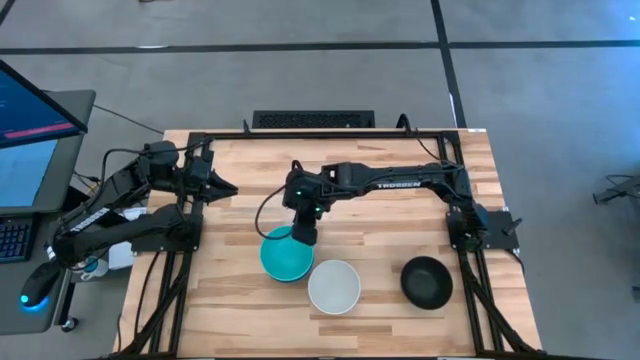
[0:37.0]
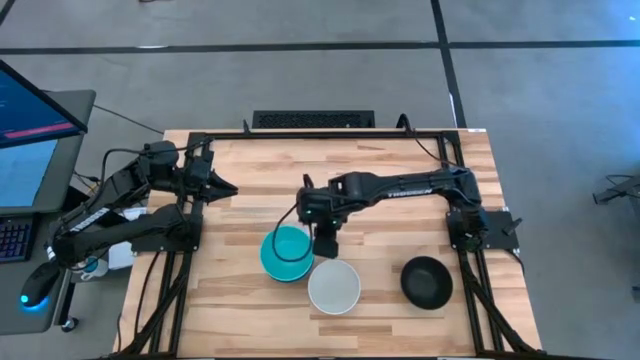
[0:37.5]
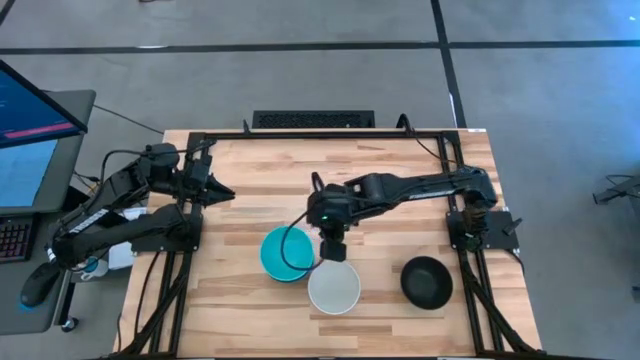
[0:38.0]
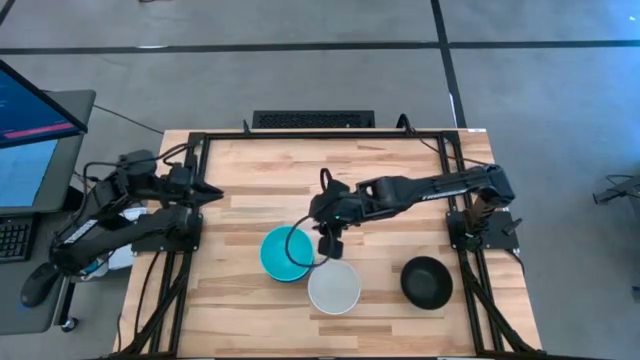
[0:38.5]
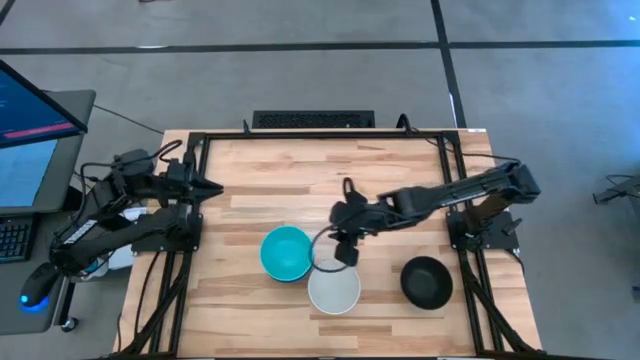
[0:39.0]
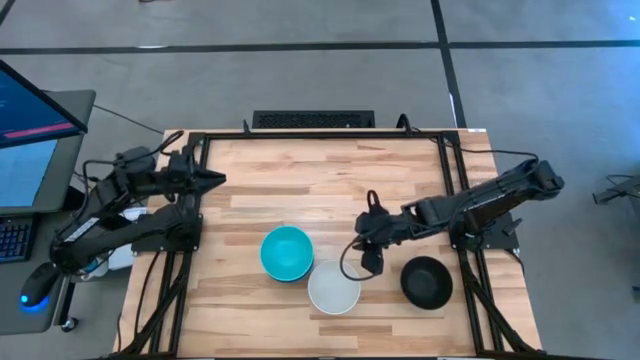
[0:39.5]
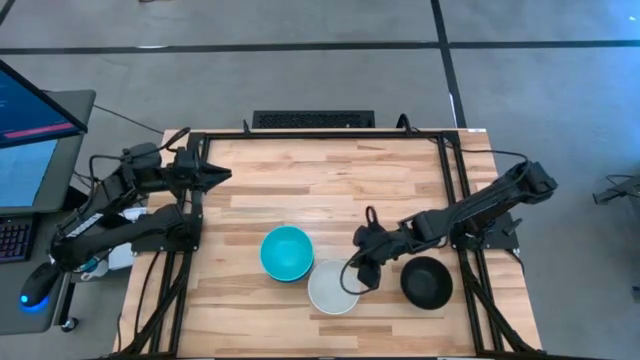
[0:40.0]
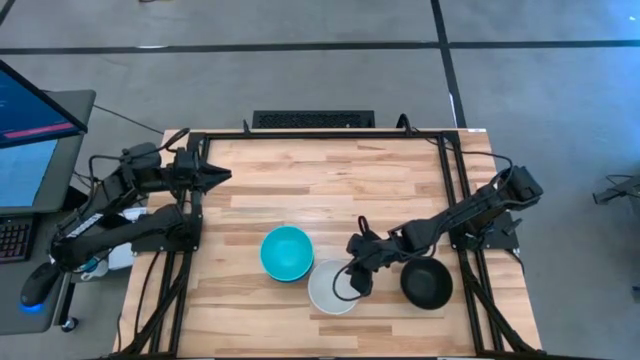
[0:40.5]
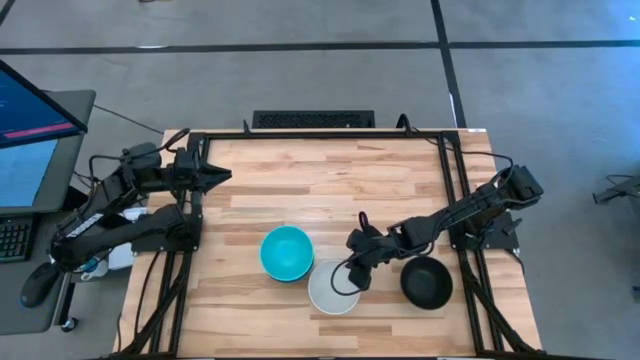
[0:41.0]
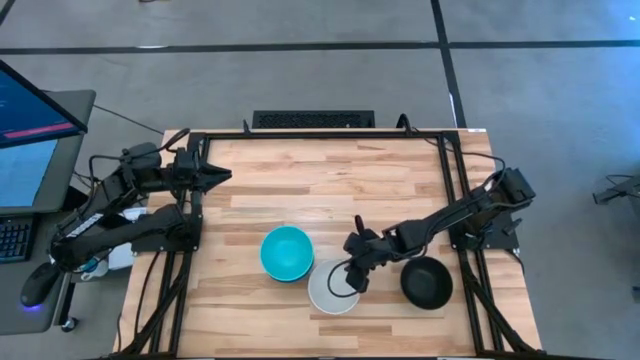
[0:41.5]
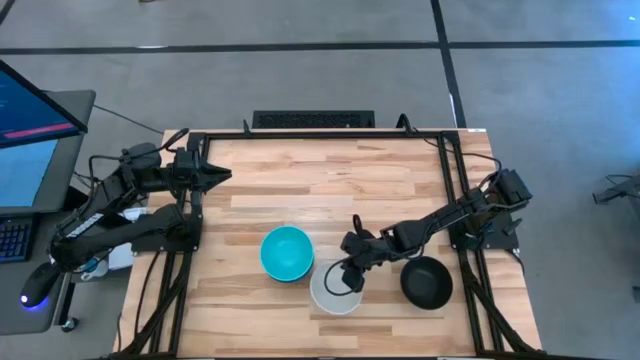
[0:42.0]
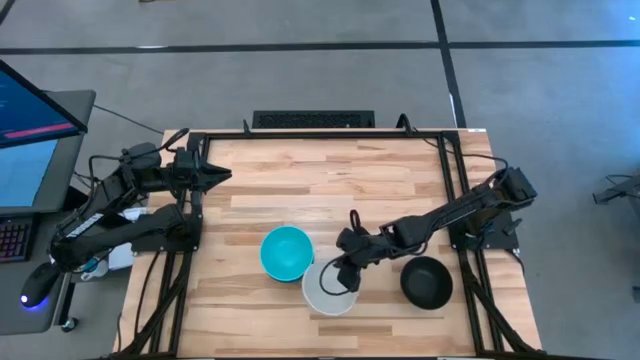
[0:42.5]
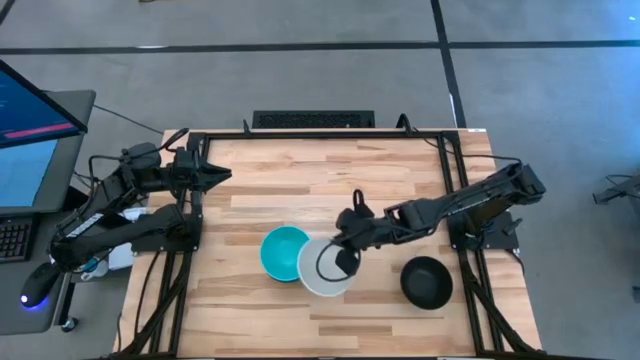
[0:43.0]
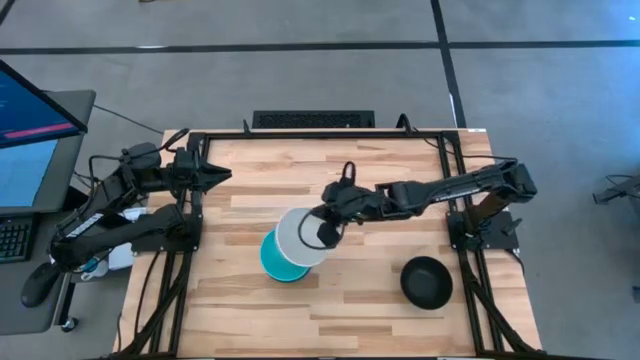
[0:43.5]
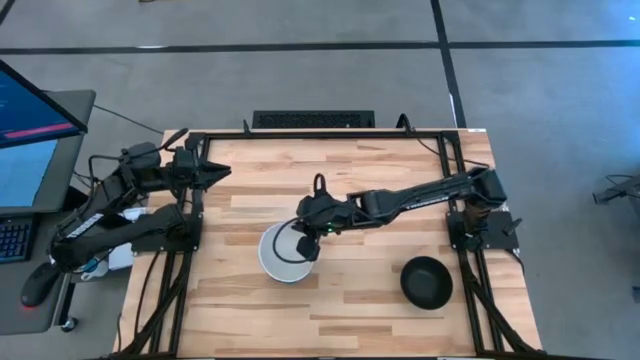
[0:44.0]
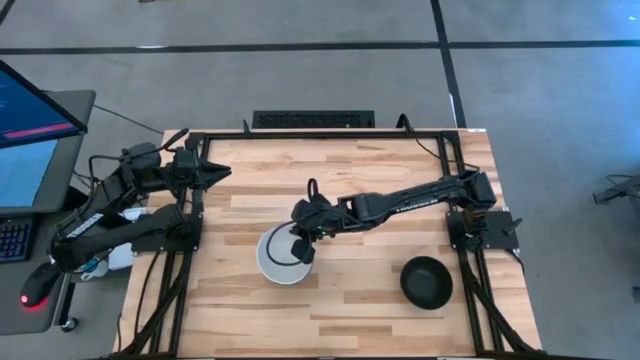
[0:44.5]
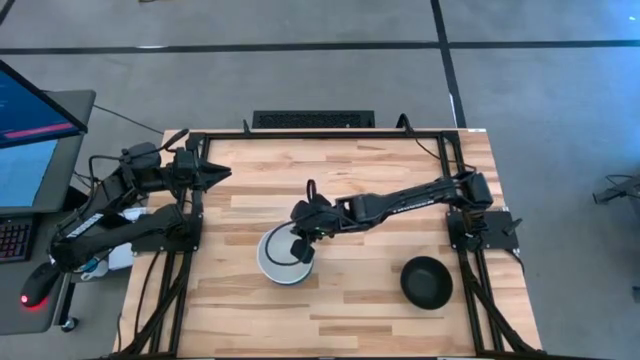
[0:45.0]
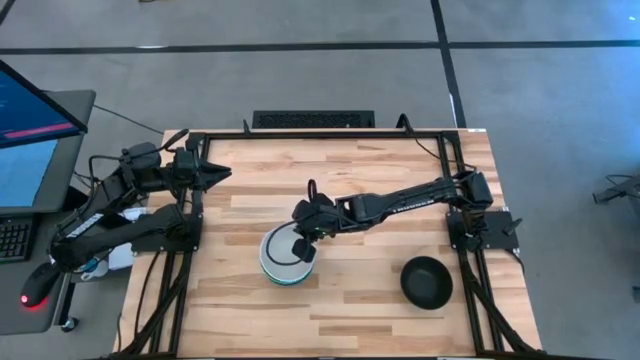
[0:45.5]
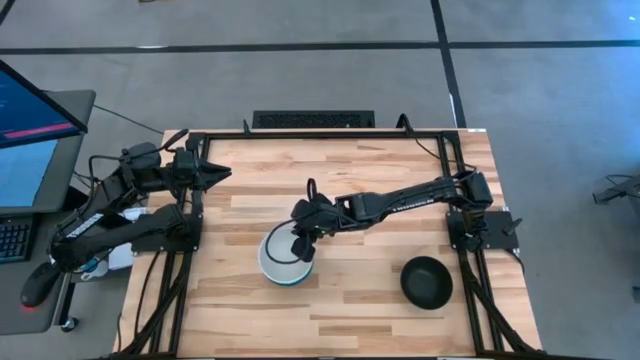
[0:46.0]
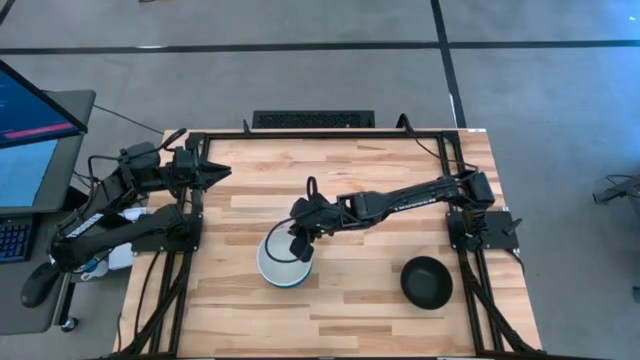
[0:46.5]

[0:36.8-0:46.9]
Task: Nest bowls inside each other
Stack the white bowl on the light blue bowl

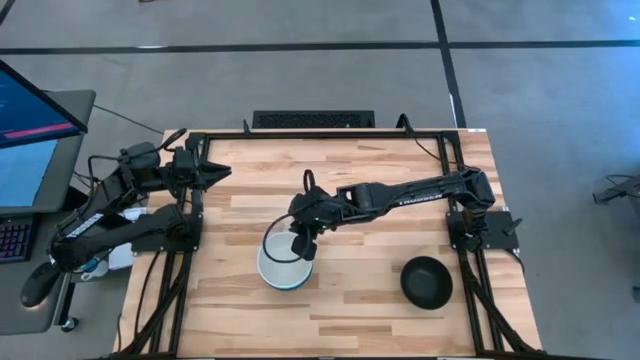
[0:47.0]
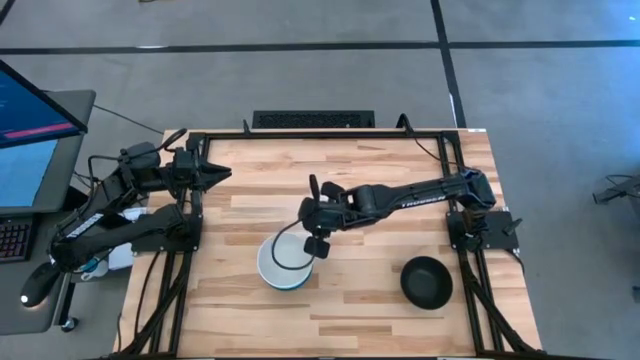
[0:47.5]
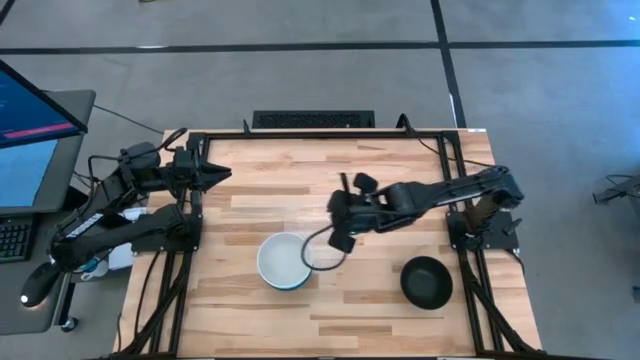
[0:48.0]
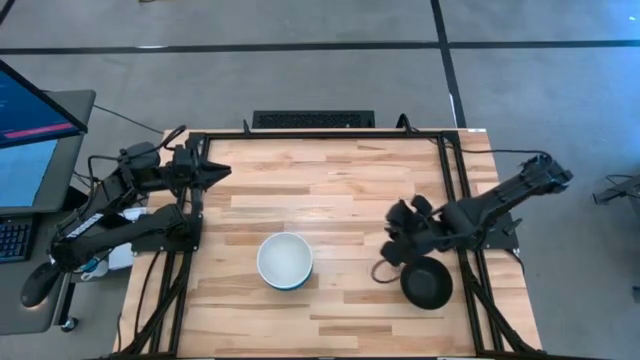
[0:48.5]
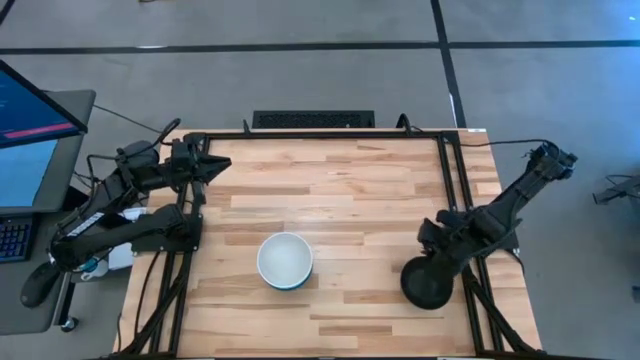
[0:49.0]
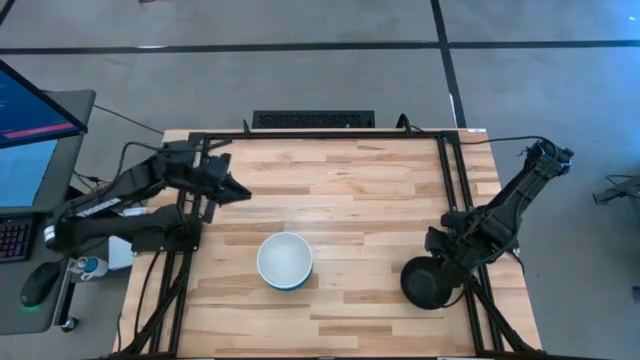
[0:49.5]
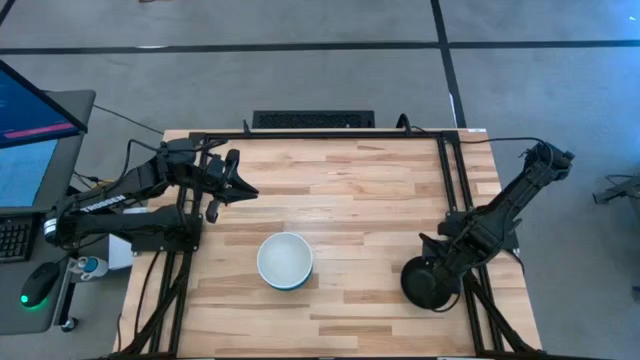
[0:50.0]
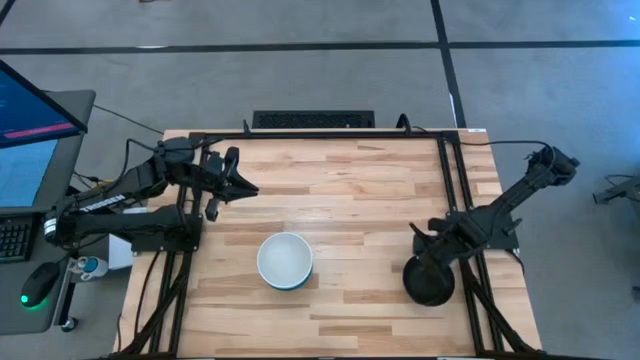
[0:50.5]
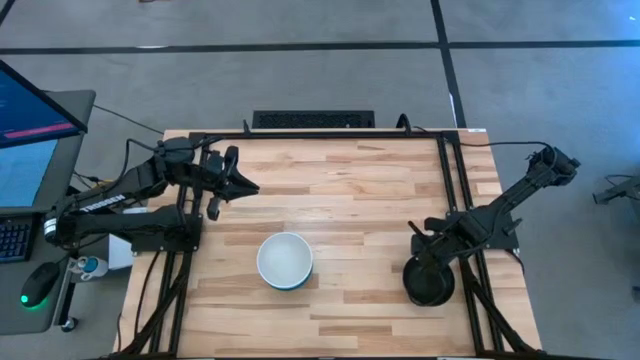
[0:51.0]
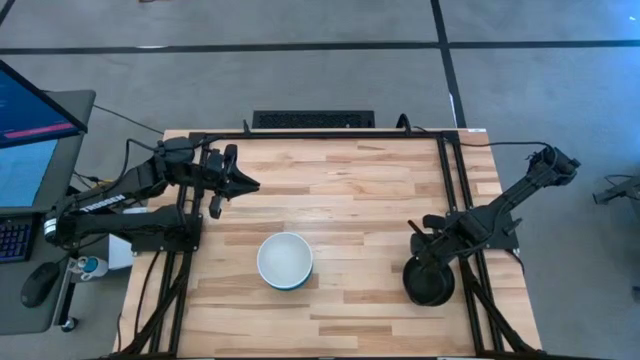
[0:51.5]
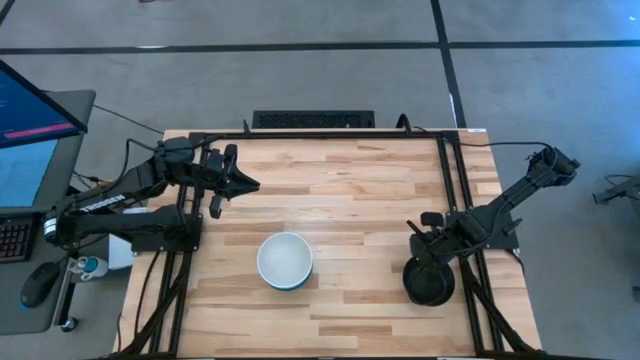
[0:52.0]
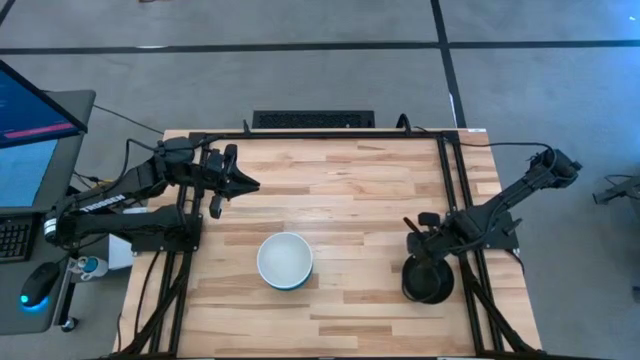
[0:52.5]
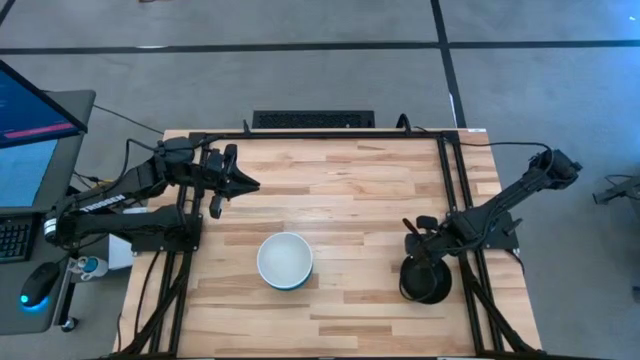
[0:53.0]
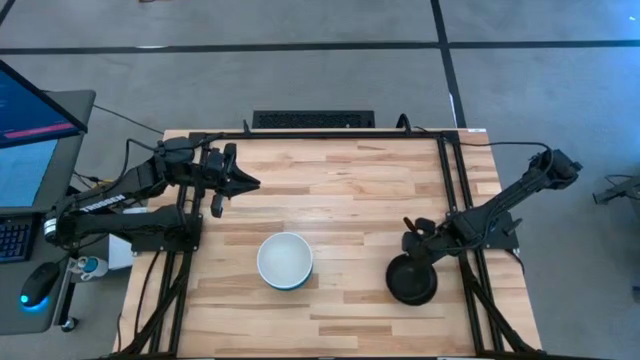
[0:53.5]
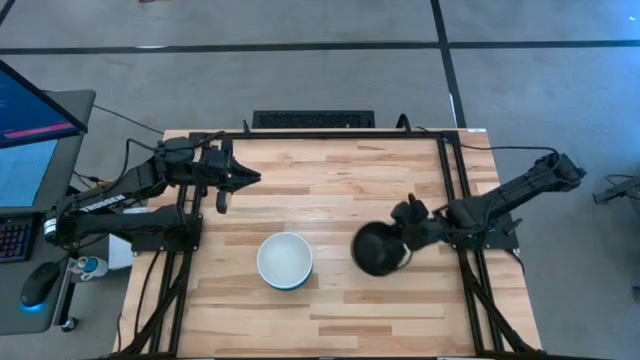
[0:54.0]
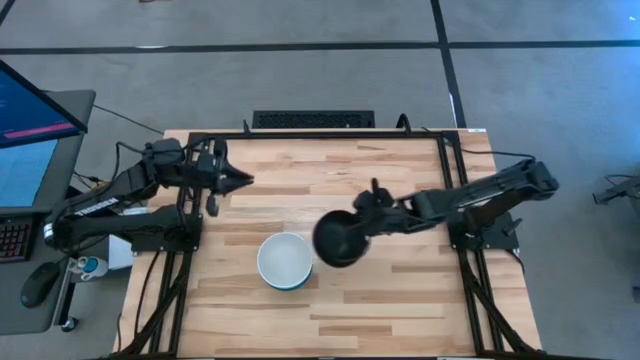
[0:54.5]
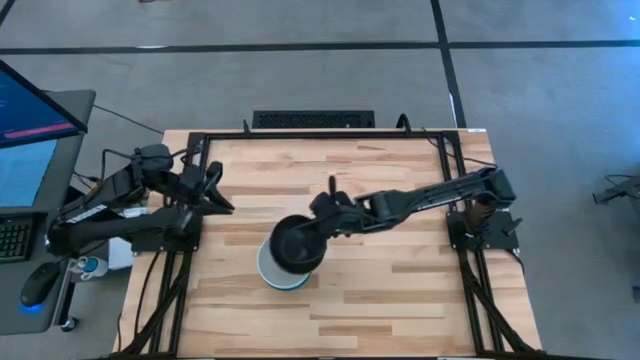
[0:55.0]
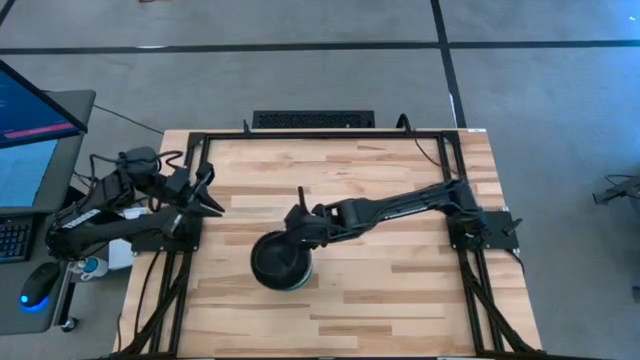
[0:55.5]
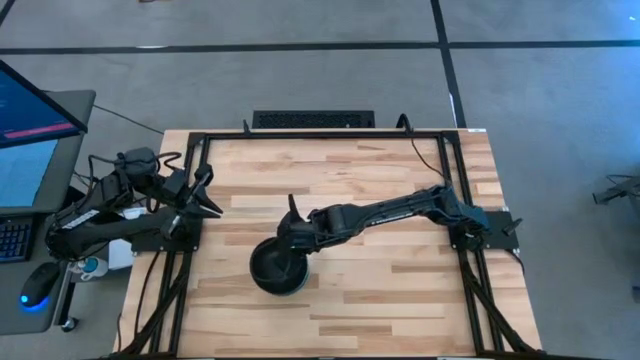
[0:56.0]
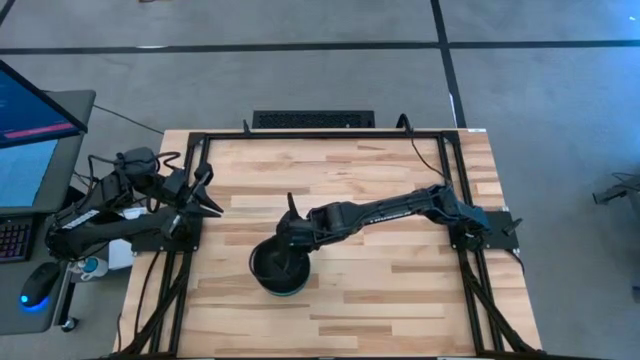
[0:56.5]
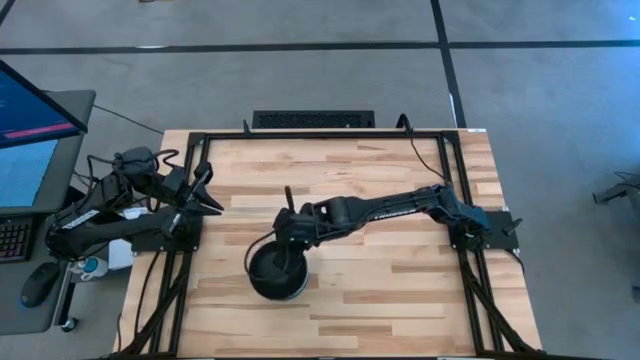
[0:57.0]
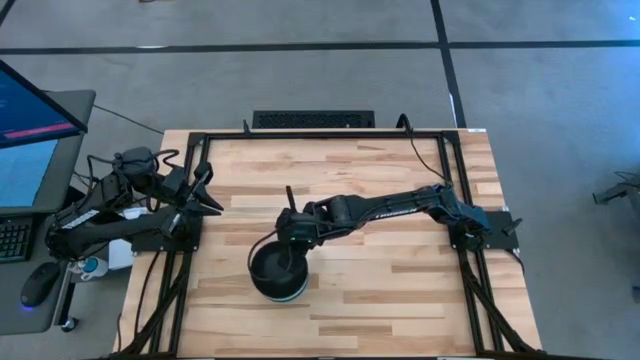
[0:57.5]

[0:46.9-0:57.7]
Stack the black bowl on the white bowl

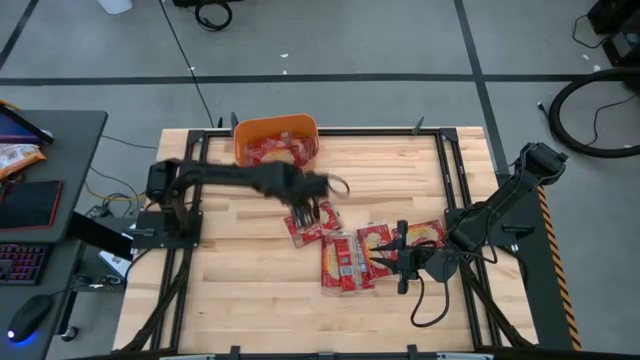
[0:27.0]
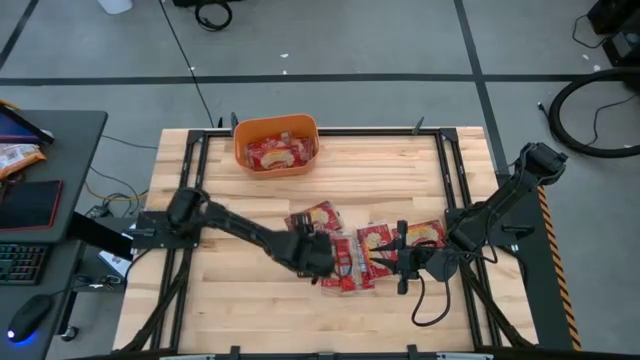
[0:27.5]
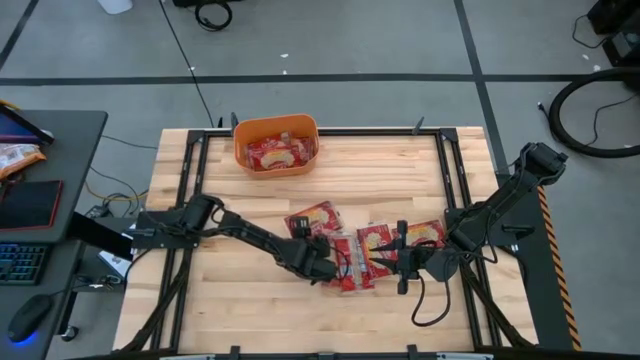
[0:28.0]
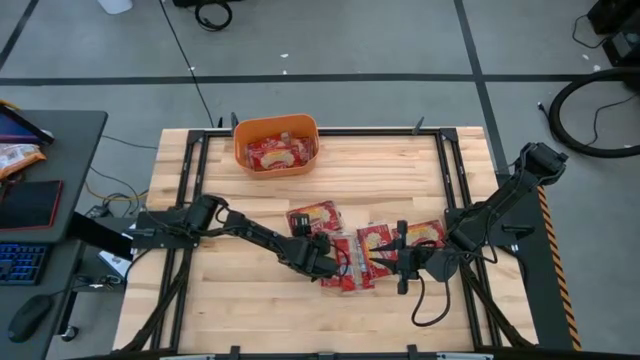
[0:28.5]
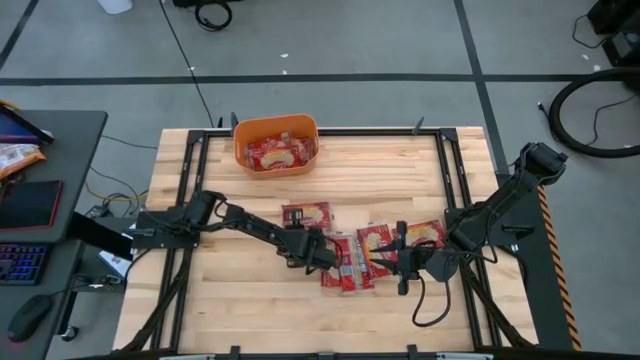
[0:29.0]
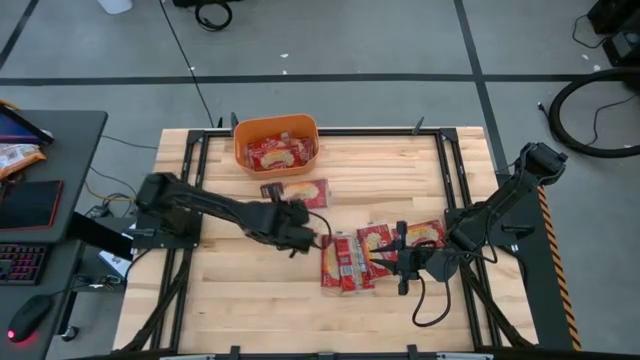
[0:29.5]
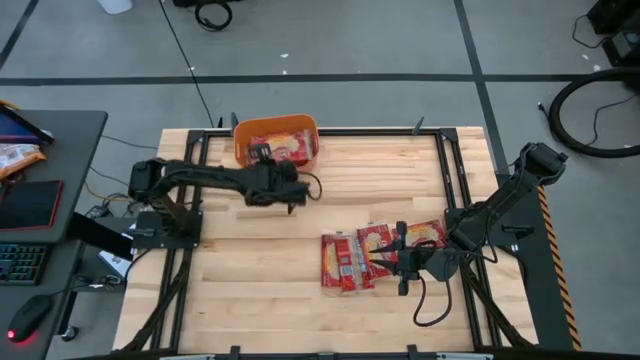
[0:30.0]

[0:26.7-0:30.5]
Task: Sort popcorn bags into baskets
Put the red popcorn bag into the orange bin
